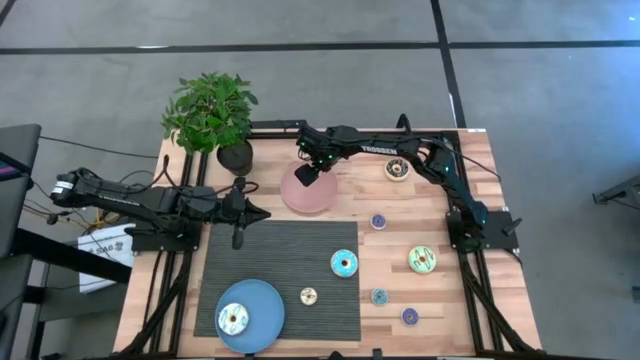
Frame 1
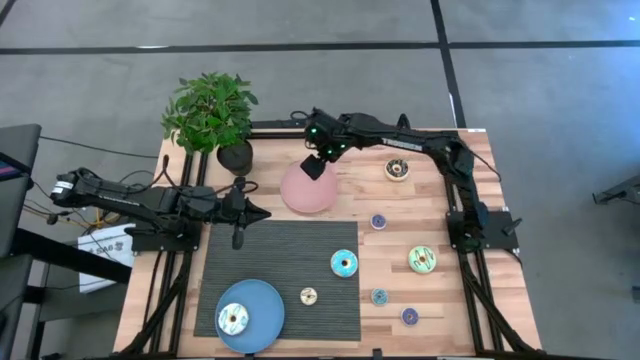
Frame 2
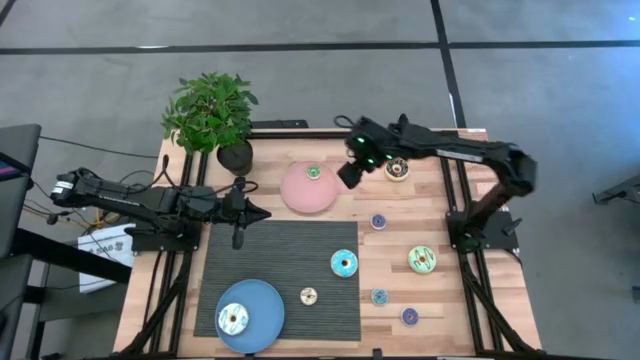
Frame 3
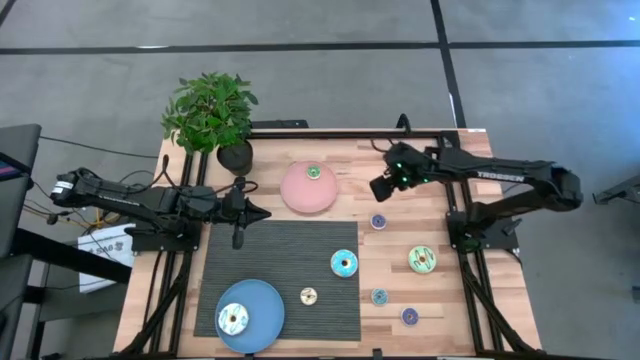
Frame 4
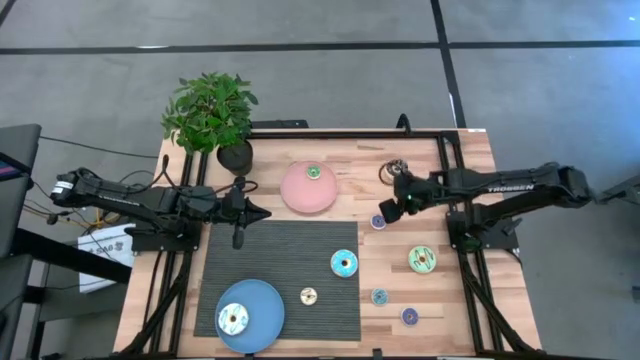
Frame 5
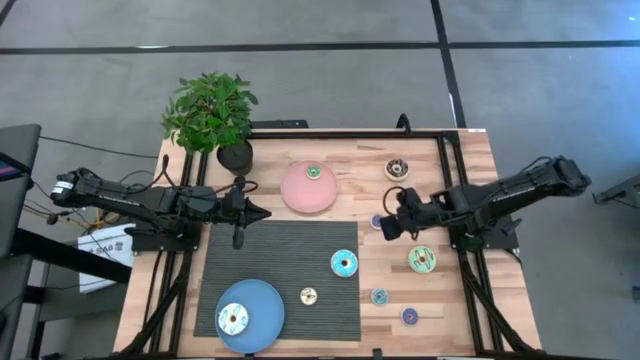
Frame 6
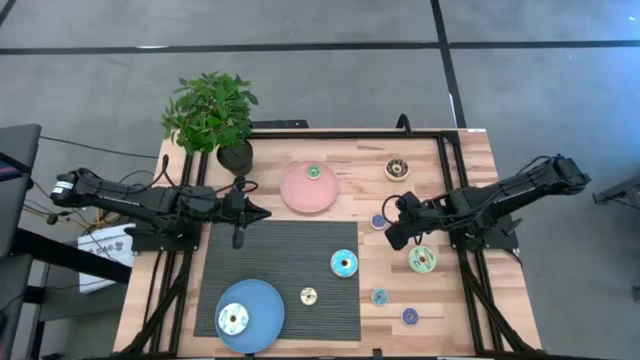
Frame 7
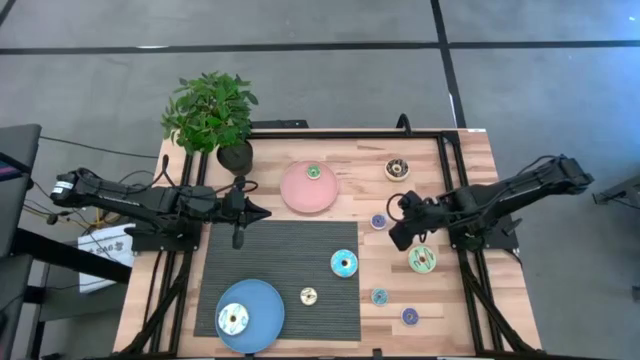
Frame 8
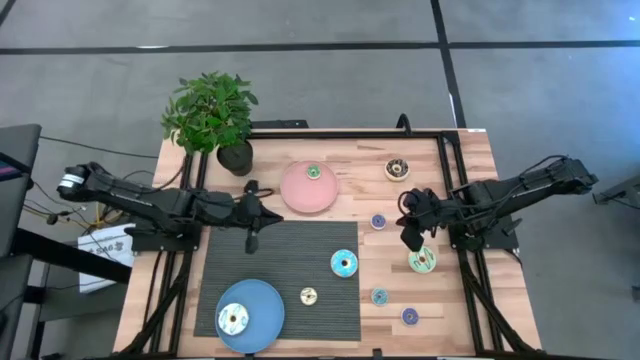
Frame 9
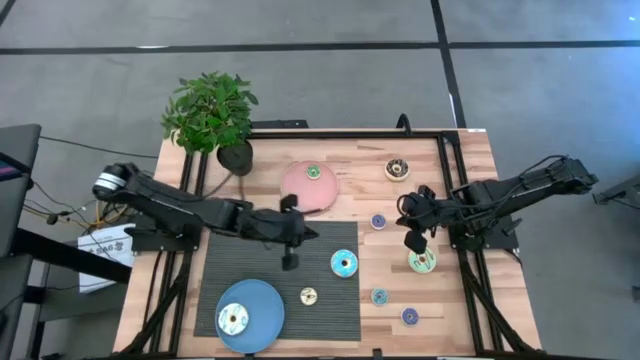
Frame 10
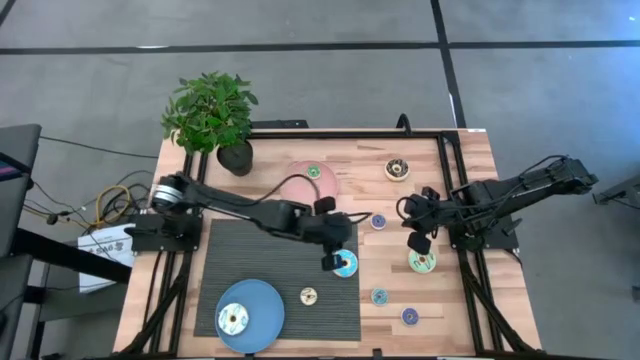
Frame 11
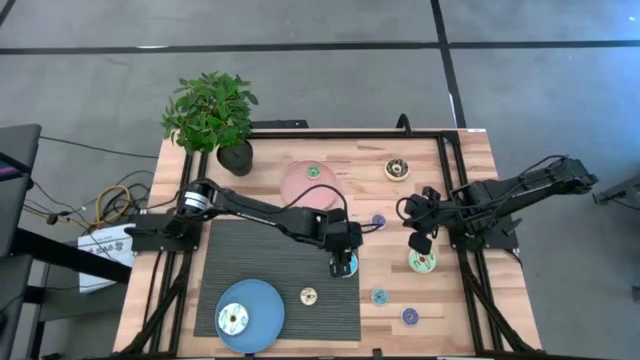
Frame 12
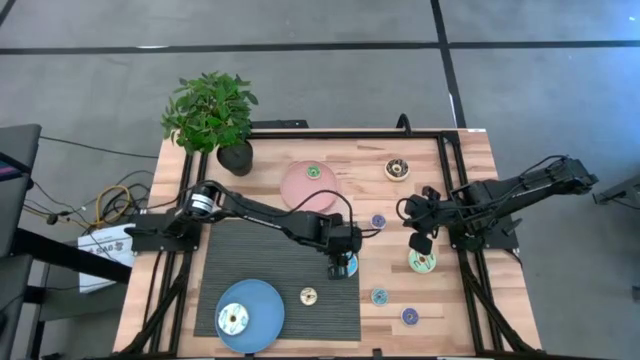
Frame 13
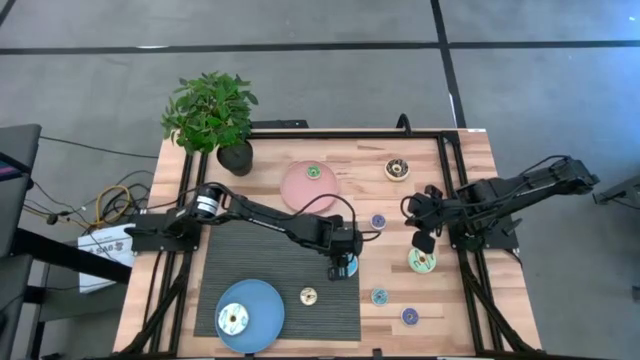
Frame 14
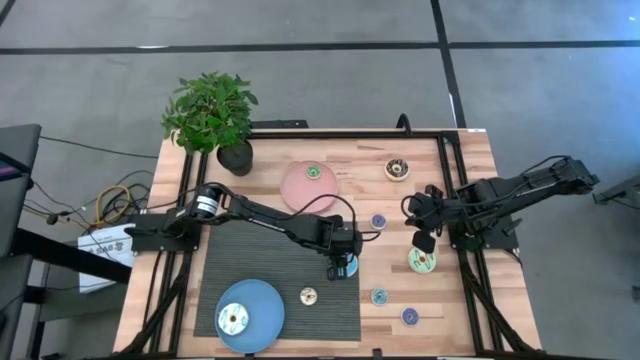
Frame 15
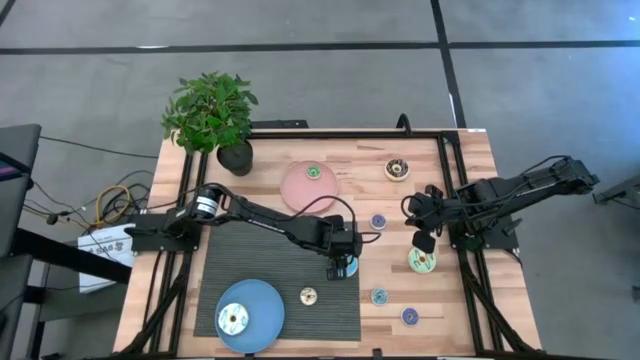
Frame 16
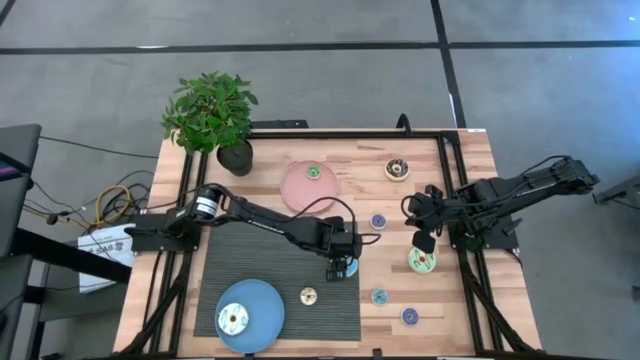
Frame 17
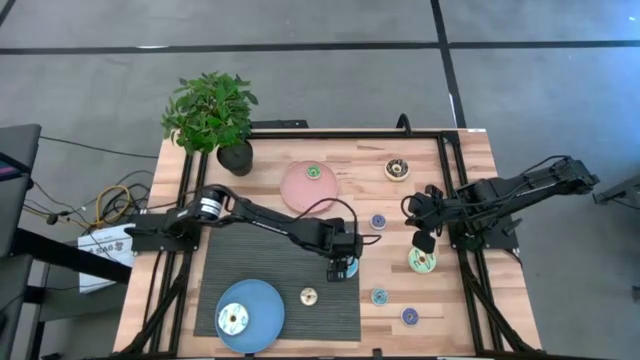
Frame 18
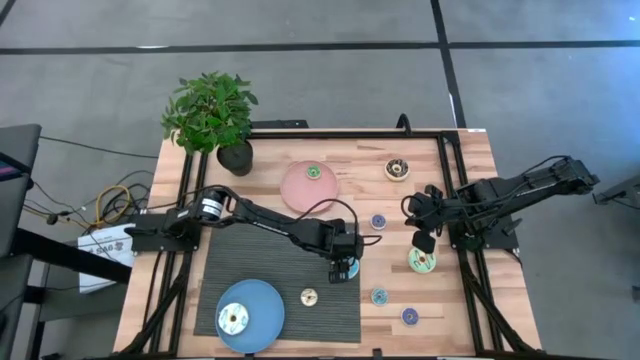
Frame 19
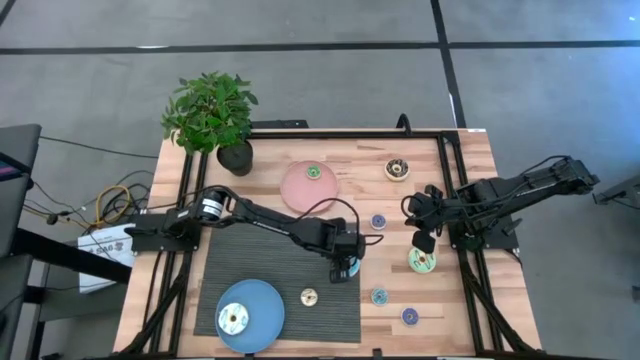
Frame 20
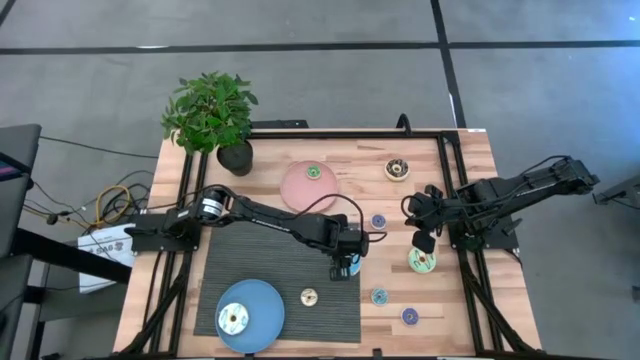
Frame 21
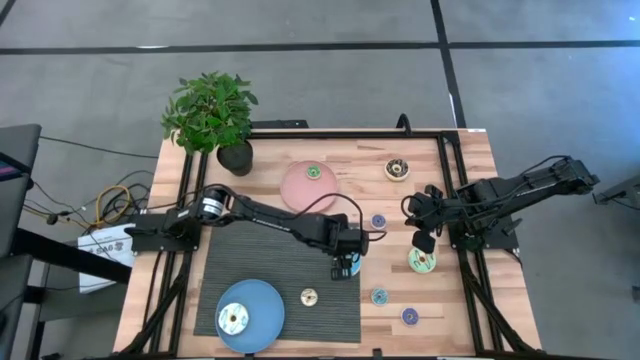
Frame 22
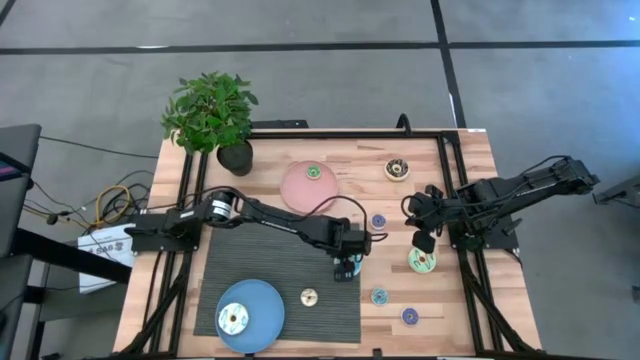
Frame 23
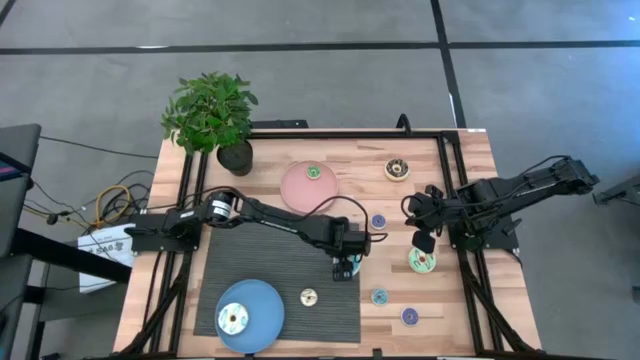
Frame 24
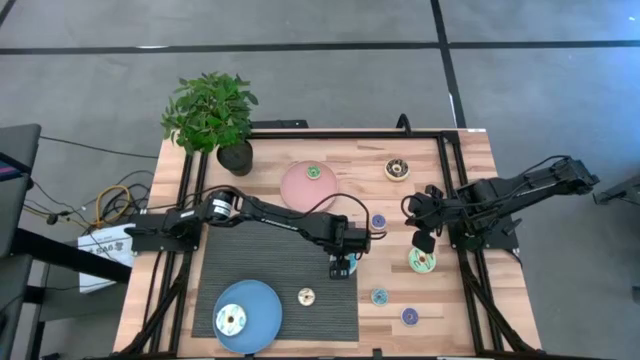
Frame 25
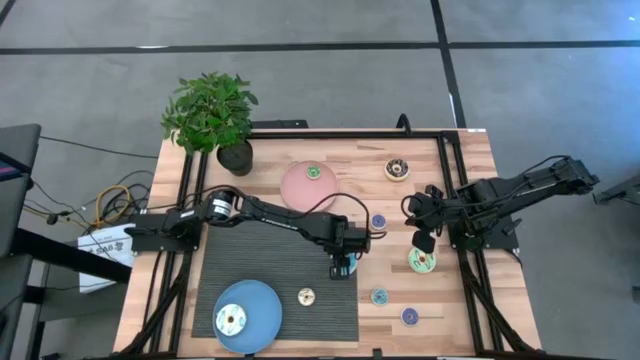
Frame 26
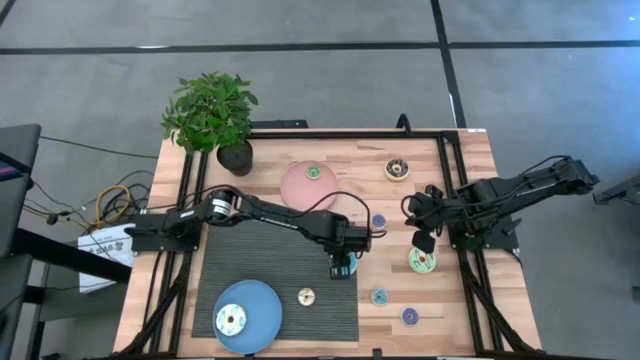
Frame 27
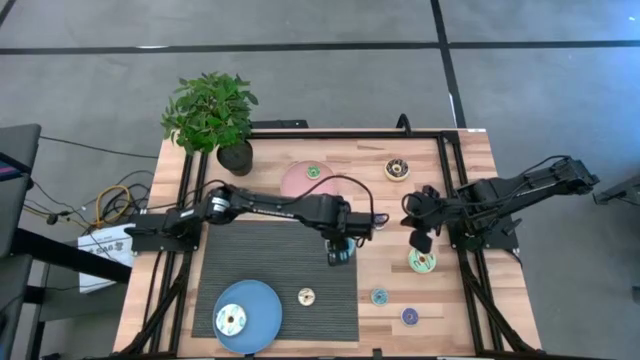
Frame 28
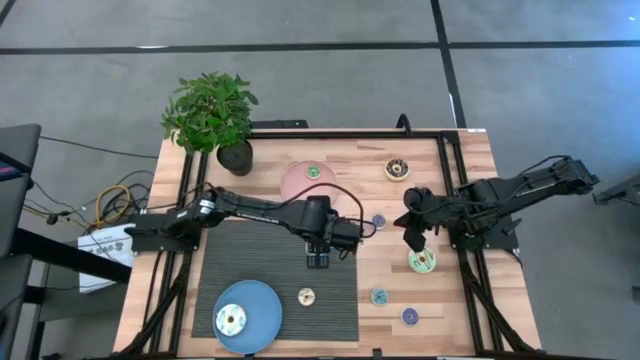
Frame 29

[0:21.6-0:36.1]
Task: Pick & Place donuts
Put the big blue donut on the blue plate

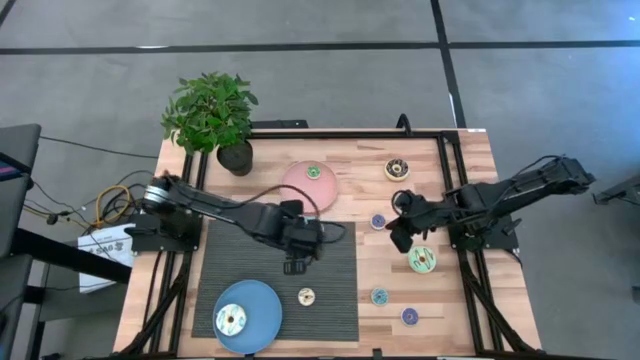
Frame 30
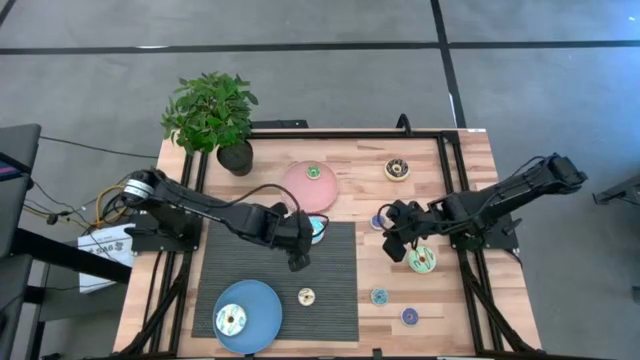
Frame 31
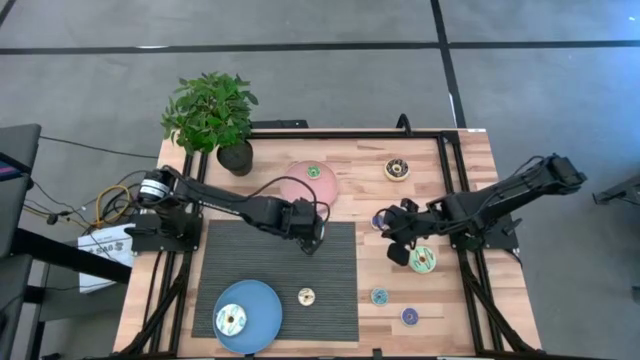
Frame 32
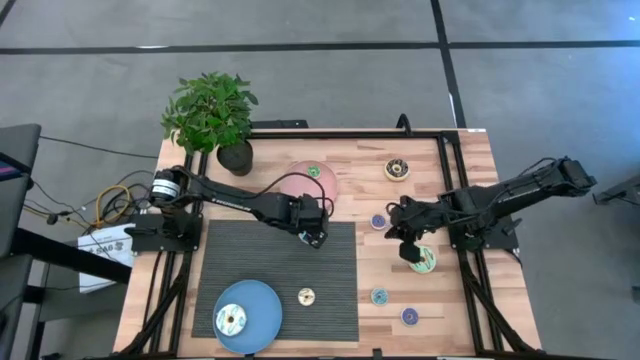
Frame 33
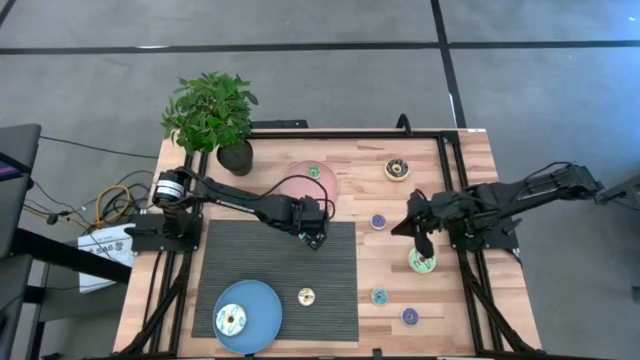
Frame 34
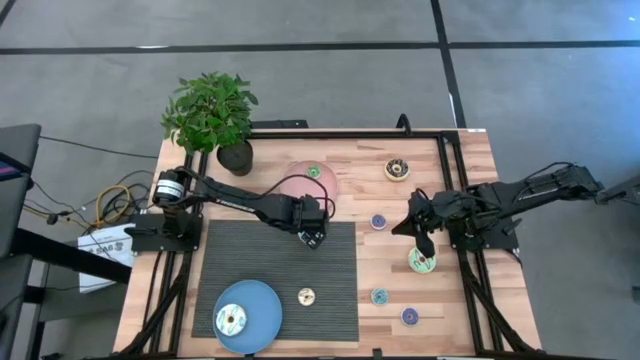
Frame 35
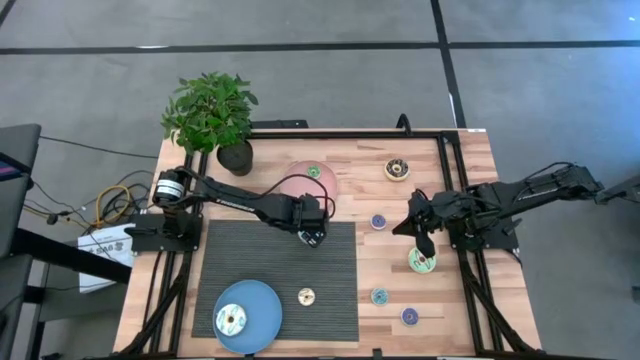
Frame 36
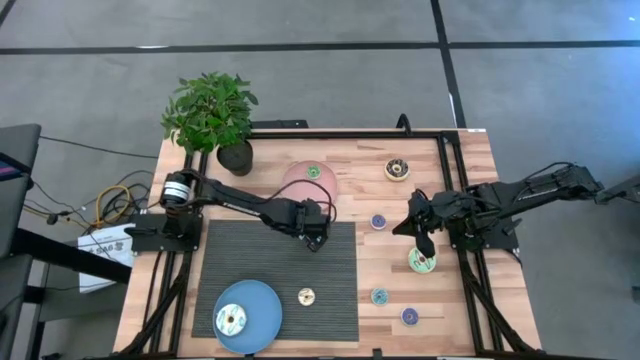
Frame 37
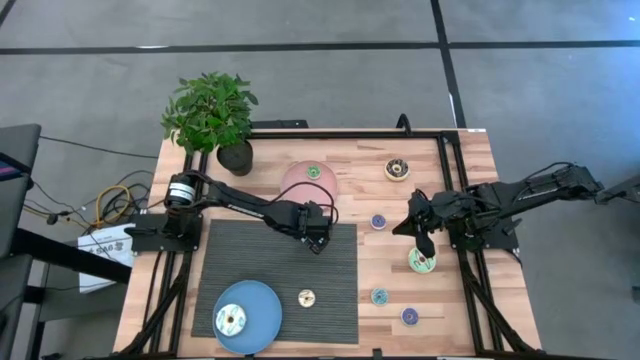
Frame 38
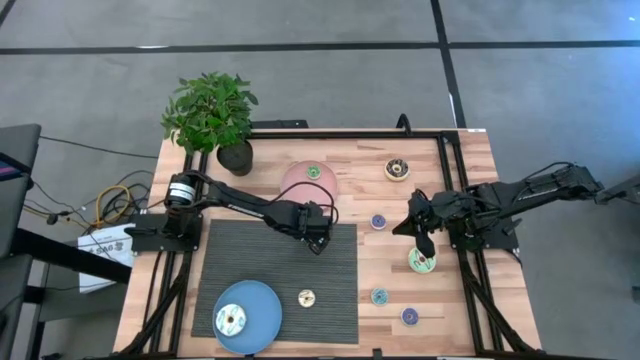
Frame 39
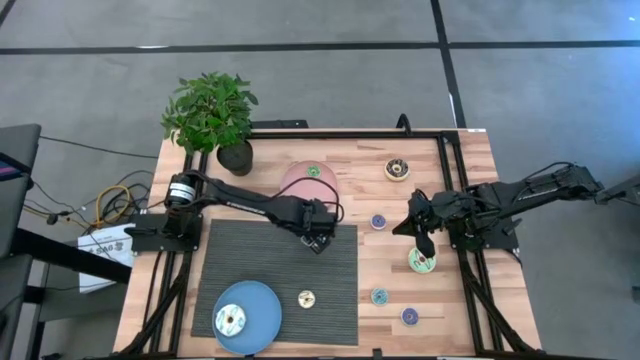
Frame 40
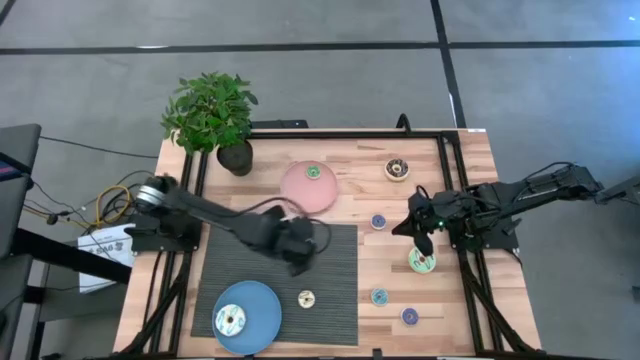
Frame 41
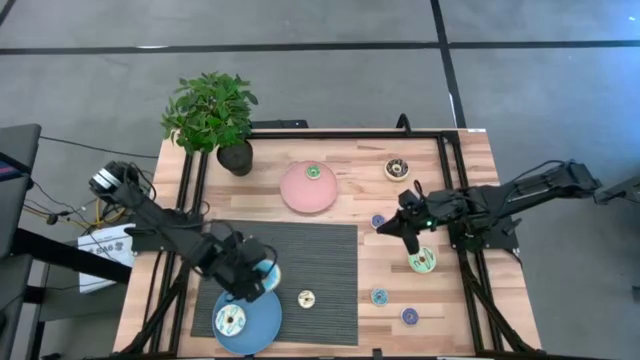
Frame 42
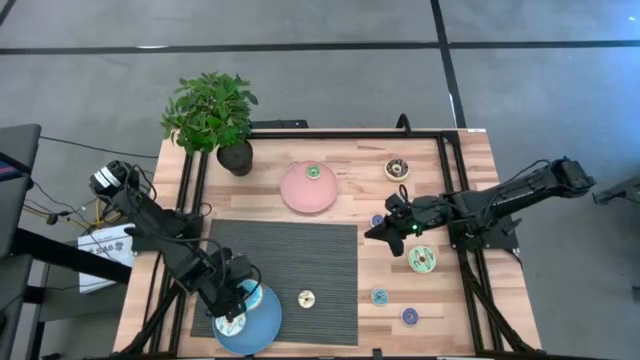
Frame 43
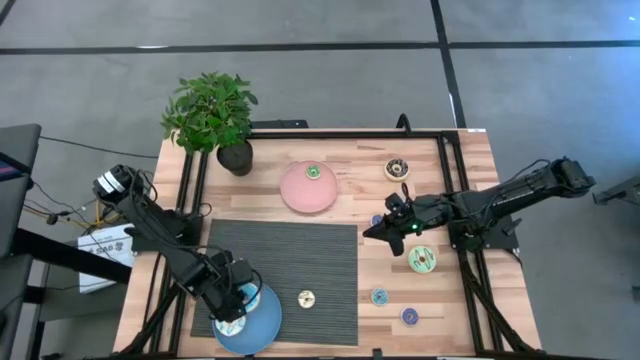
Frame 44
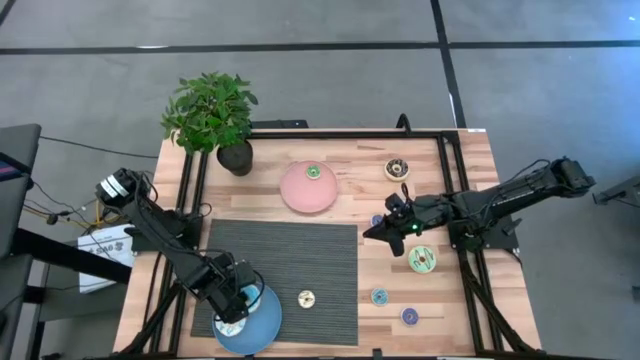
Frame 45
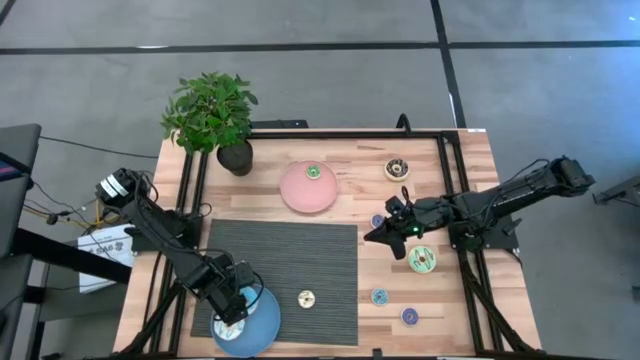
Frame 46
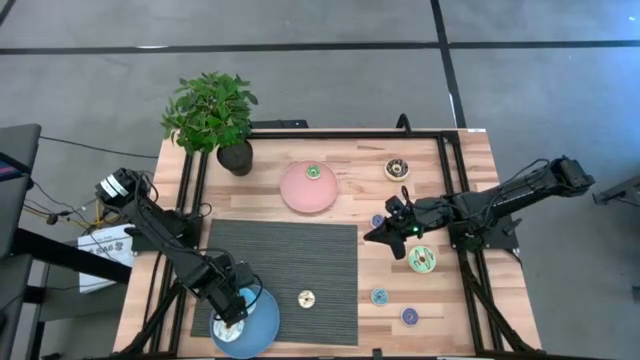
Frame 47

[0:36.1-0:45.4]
Put the big blue donut on the blue plate
